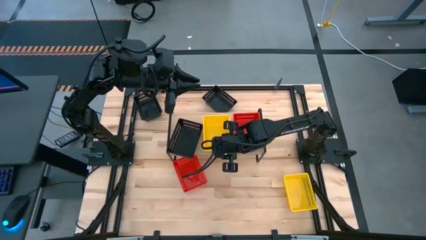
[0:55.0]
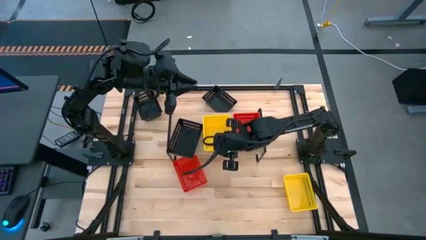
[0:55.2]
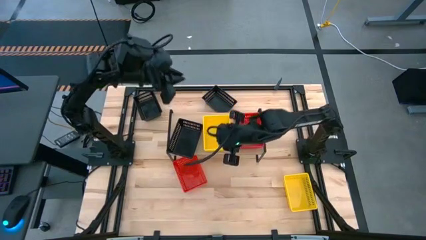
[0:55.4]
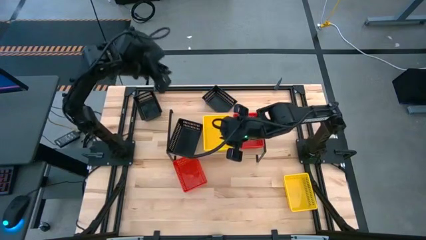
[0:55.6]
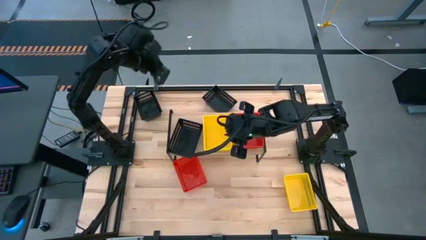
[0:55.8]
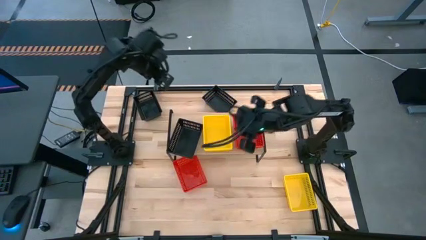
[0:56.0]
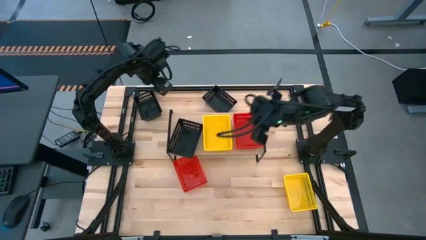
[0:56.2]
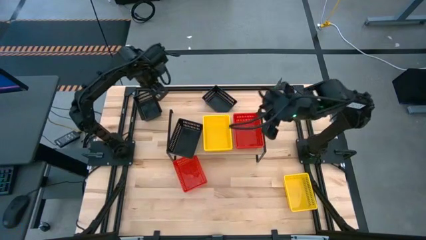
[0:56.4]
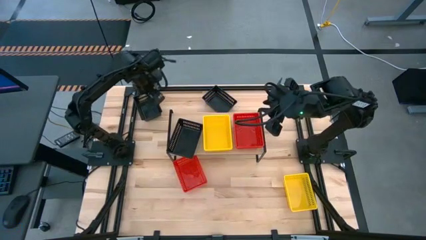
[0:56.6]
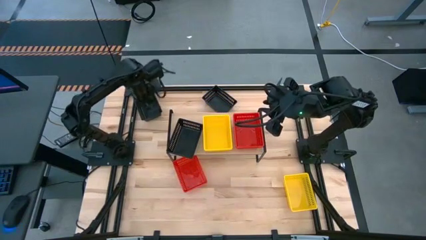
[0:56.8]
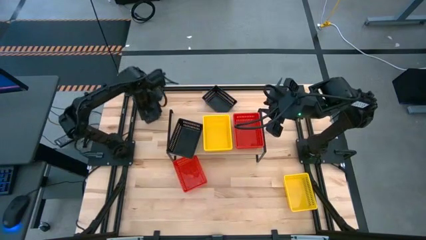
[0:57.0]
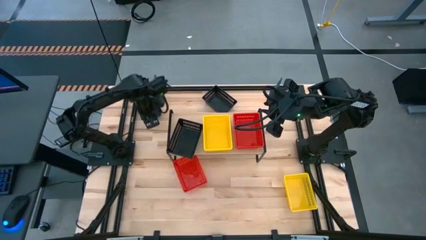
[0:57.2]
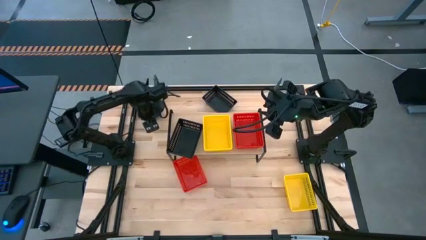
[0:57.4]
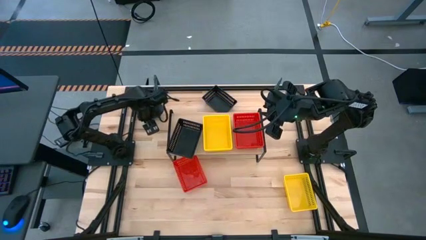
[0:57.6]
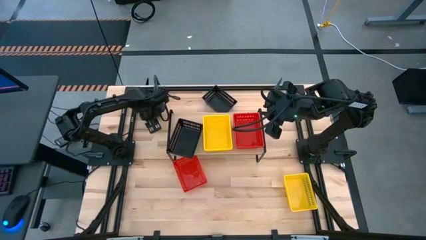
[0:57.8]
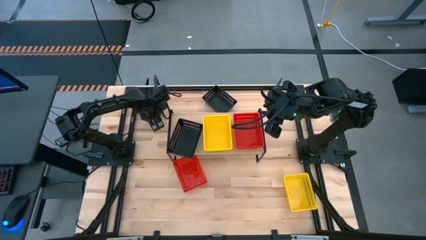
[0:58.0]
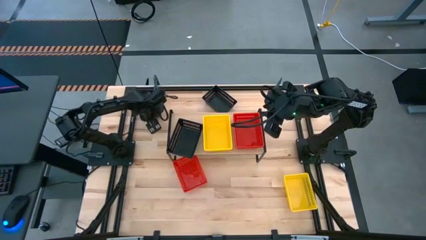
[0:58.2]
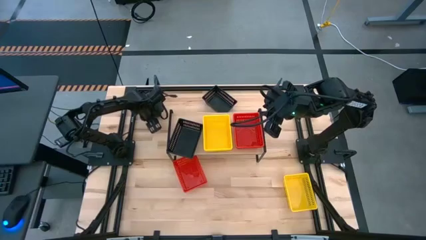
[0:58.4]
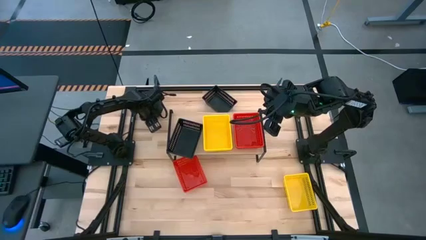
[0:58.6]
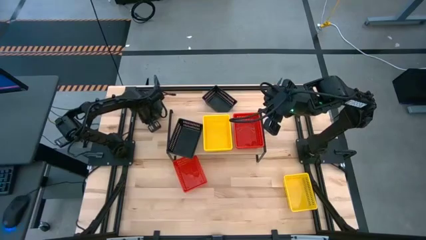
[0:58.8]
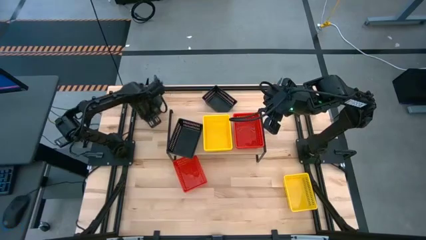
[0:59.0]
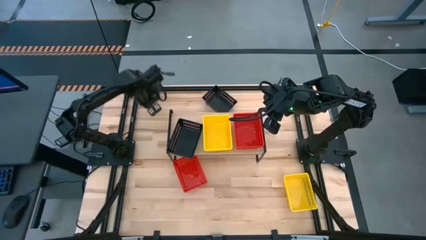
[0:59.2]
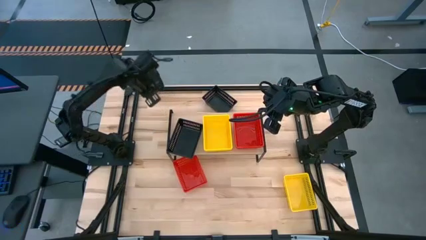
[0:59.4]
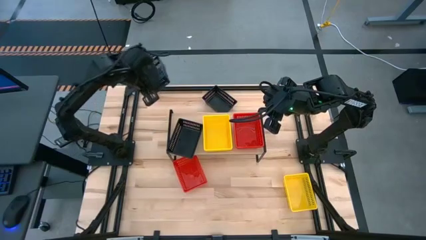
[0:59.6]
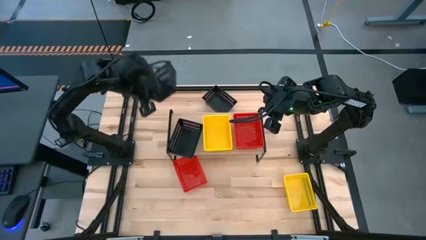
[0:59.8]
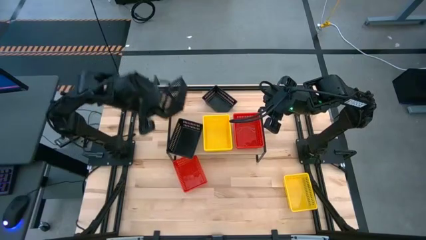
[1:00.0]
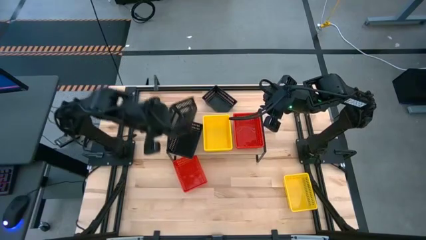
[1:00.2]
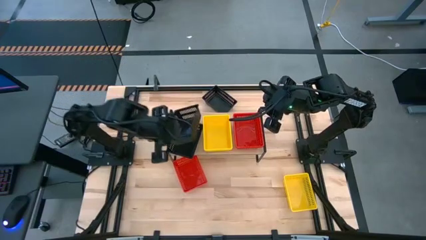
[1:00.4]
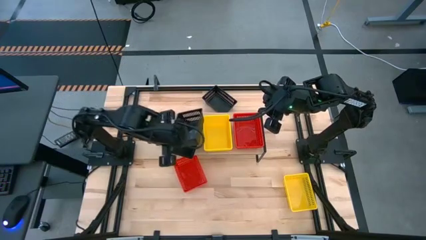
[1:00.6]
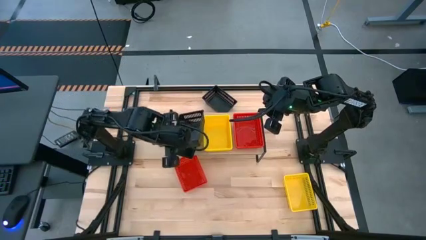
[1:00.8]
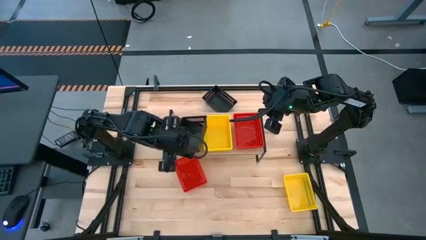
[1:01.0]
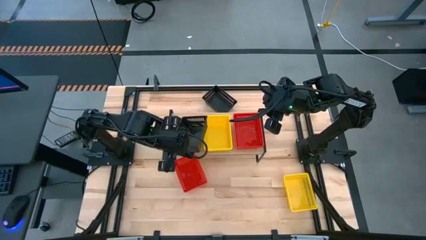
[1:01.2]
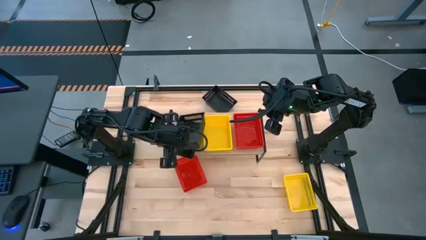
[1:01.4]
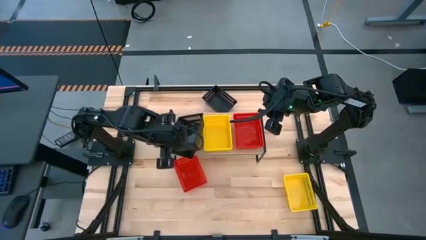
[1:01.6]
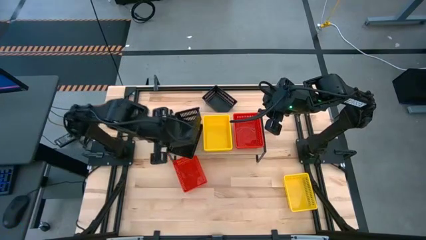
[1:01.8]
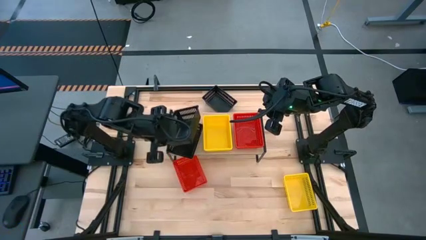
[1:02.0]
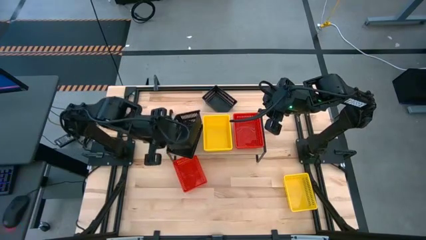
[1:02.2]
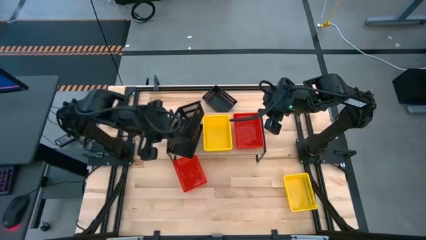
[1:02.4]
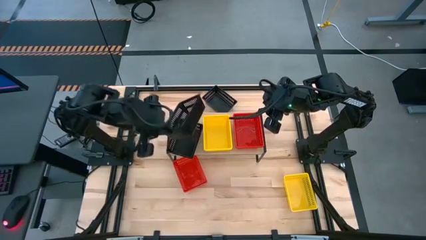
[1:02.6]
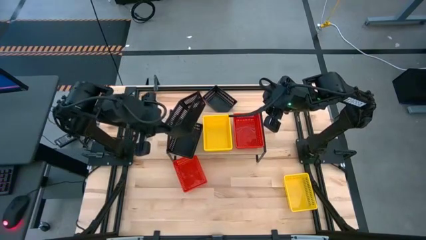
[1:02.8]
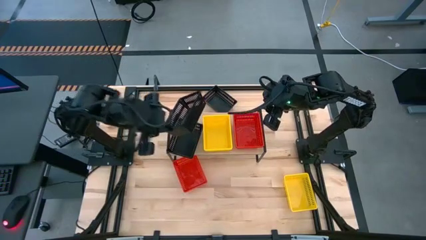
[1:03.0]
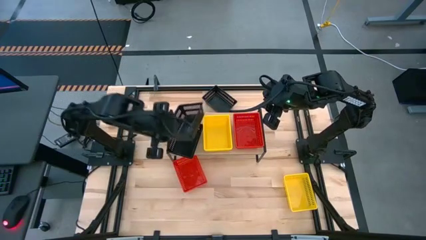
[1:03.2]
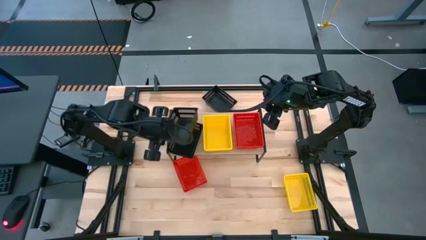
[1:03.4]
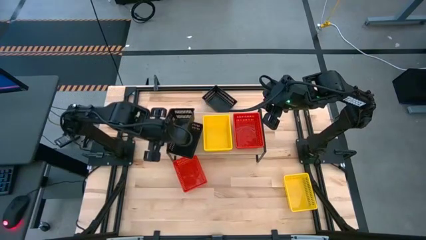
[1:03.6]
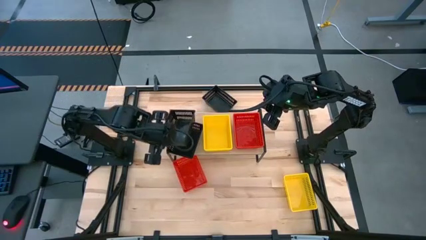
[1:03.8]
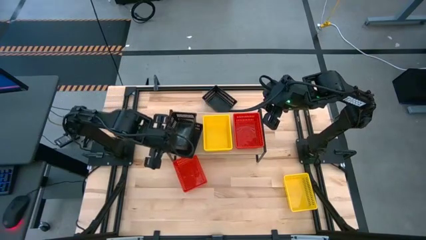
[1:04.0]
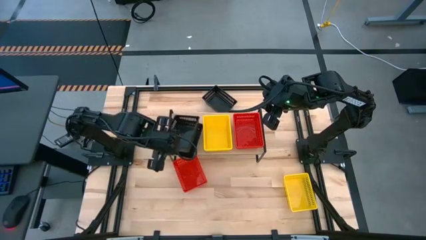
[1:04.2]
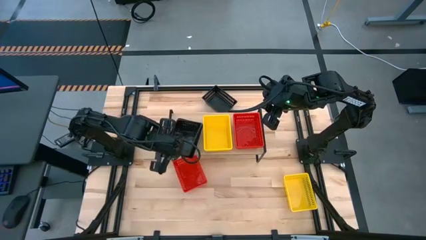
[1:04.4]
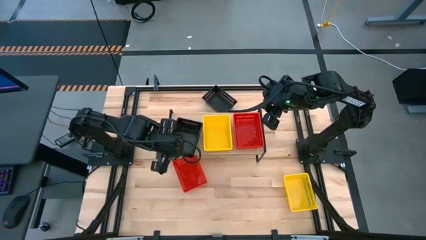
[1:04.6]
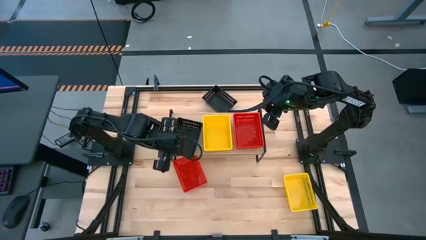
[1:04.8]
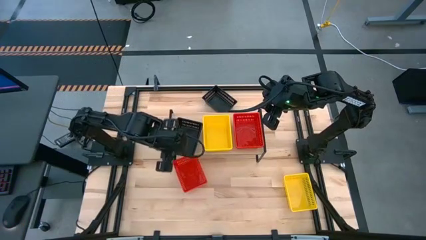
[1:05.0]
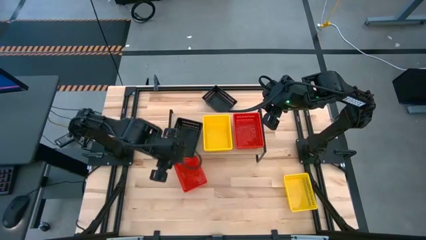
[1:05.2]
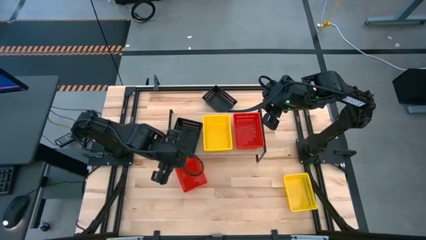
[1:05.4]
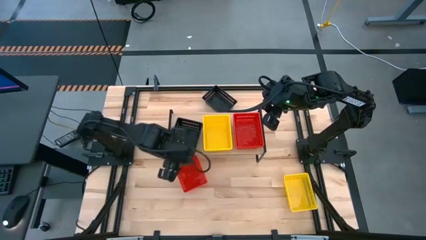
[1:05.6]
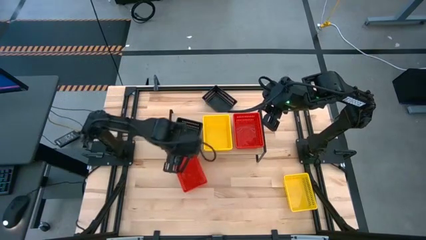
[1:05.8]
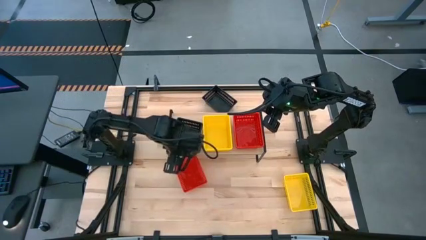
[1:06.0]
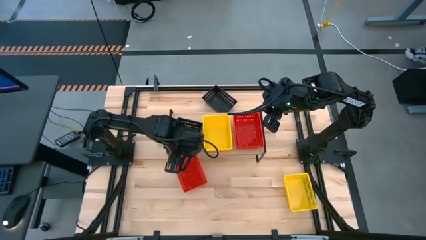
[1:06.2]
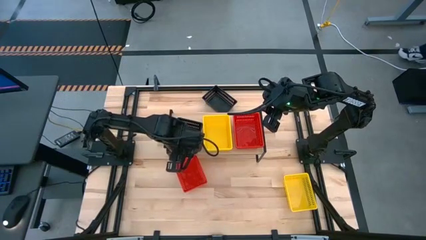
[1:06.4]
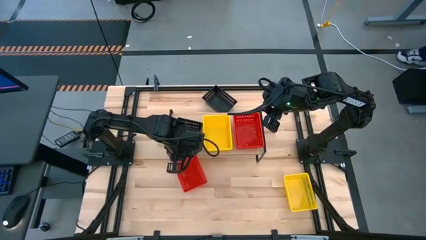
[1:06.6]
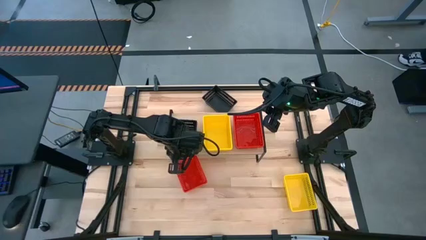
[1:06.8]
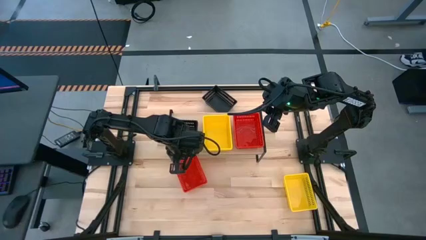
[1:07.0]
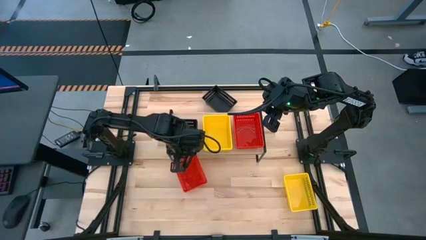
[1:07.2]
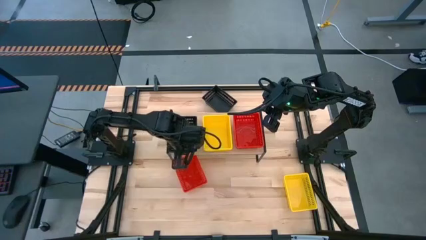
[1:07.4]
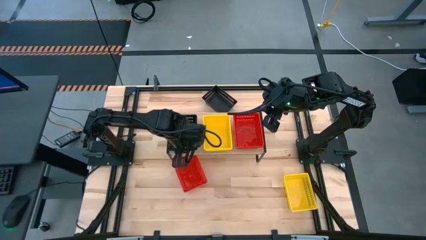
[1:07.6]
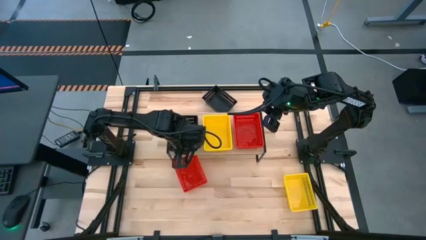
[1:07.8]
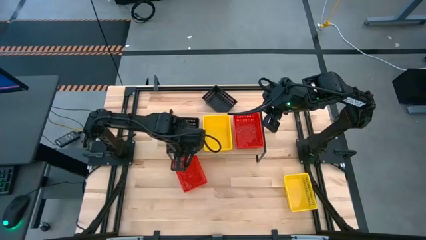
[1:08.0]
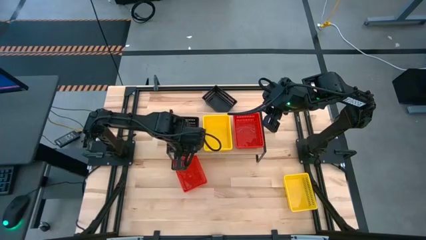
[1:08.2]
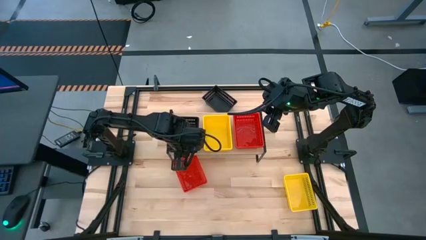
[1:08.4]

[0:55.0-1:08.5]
Task: Stack baskets on shelf by color
Stack the left black basket on the black basket on the shelf
